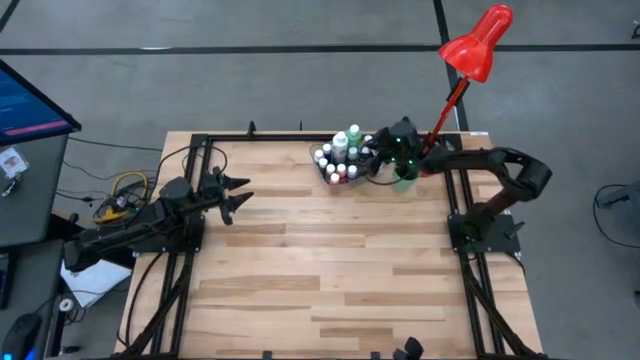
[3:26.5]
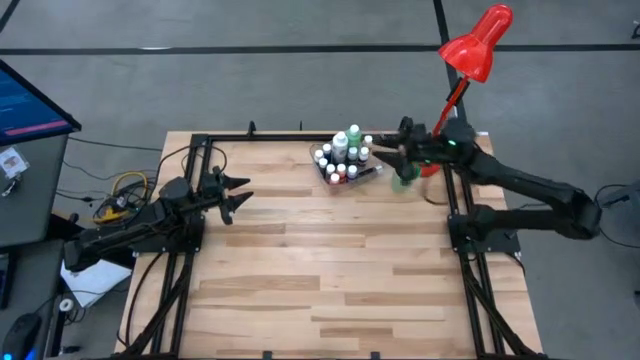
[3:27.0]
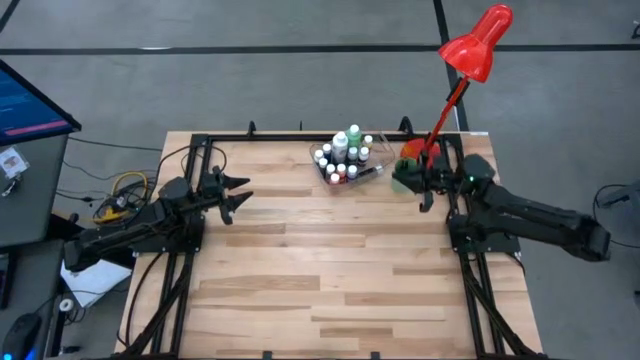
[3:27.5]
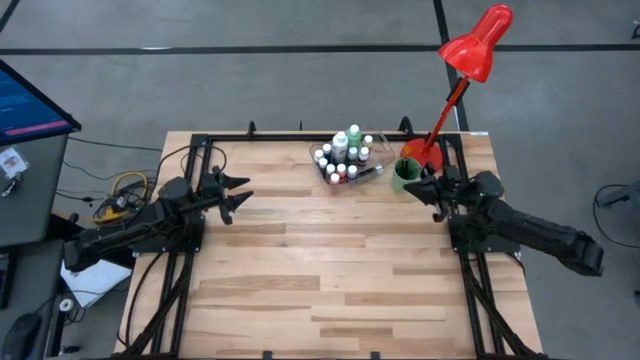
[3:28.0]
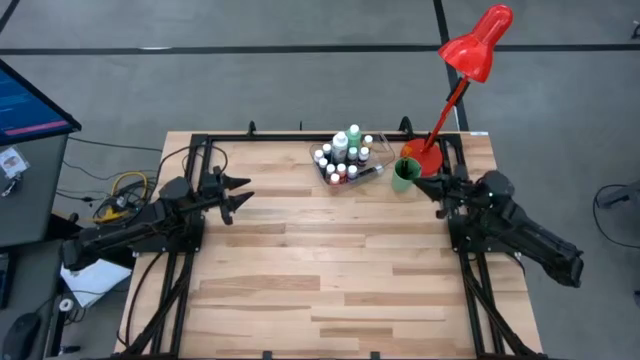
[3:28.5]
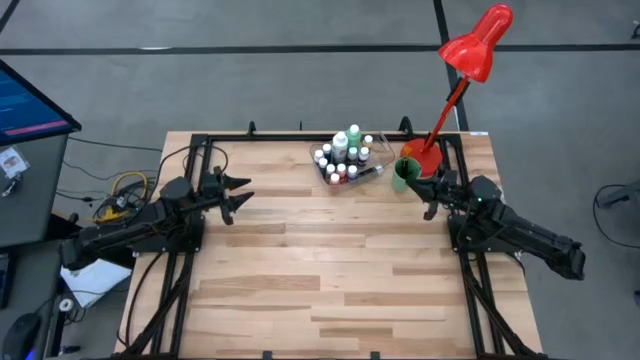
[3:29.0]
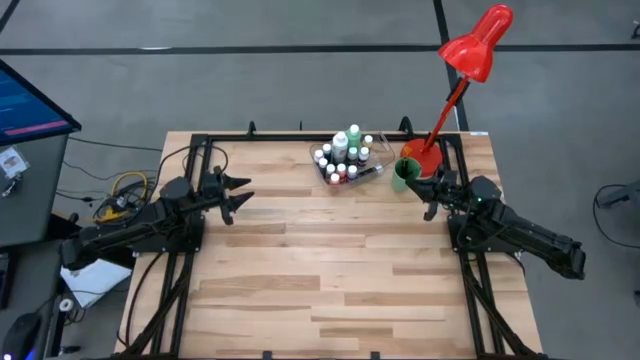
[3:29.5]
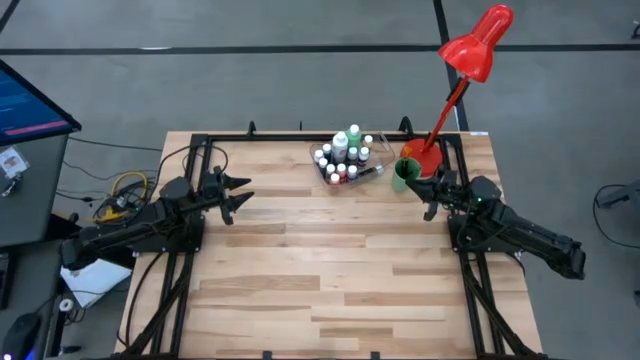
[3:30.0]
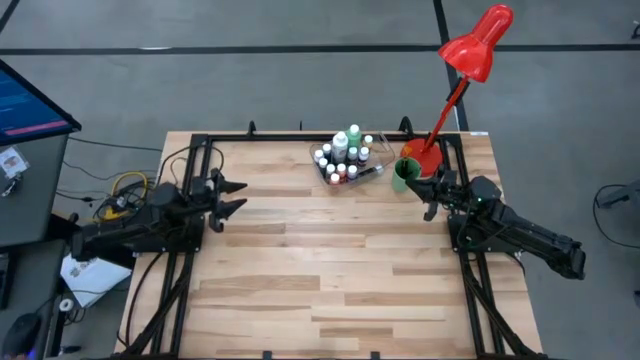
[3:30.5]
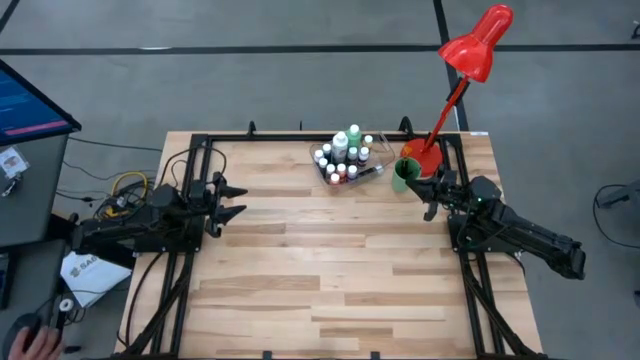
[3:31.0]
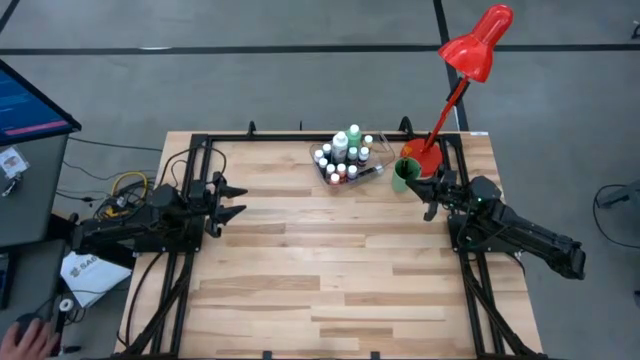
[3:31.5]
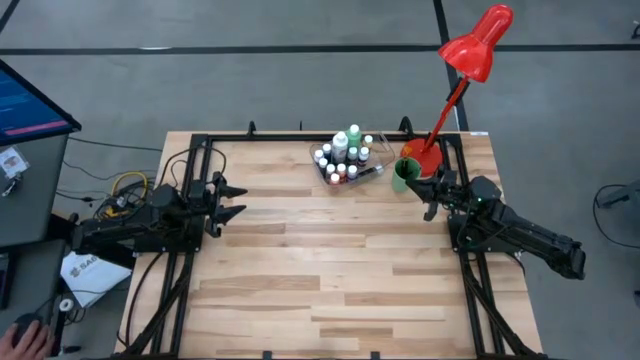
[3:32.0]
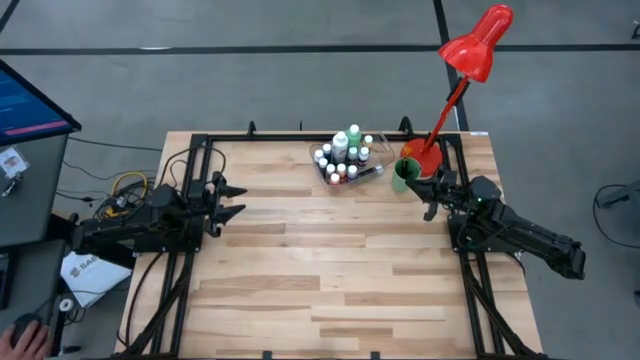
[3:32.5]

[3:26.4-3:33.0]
Task: Pick & Place Paint Supplies
Return to Home Position

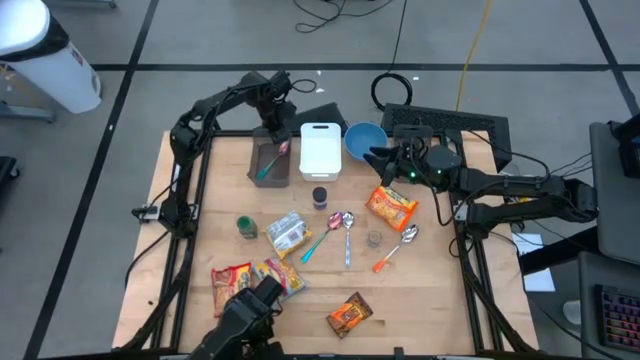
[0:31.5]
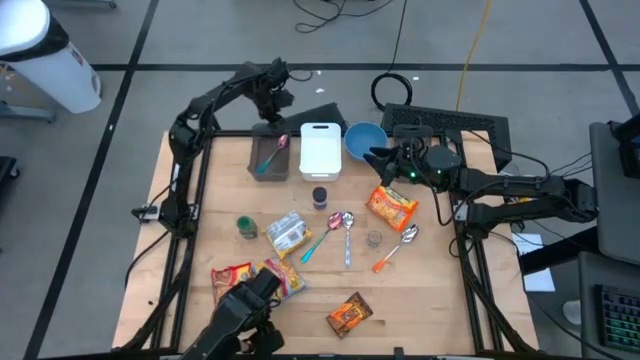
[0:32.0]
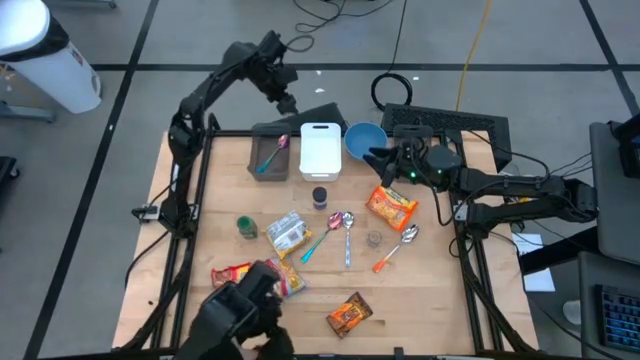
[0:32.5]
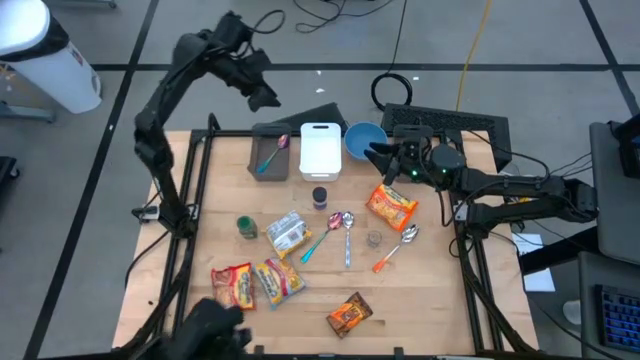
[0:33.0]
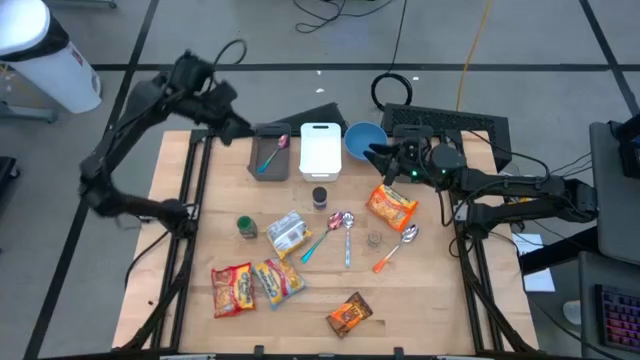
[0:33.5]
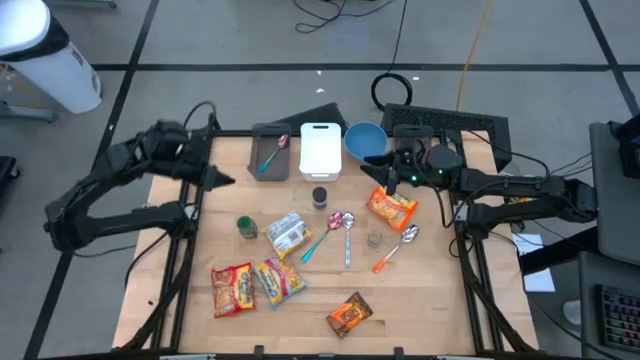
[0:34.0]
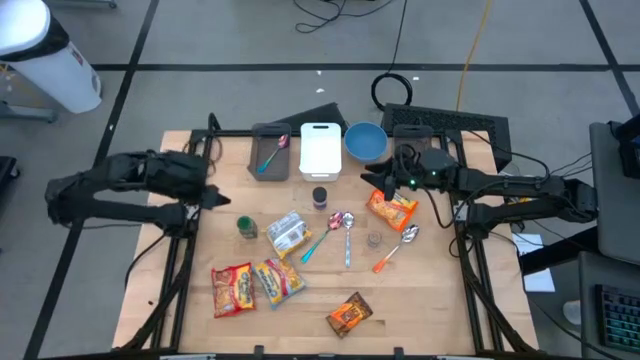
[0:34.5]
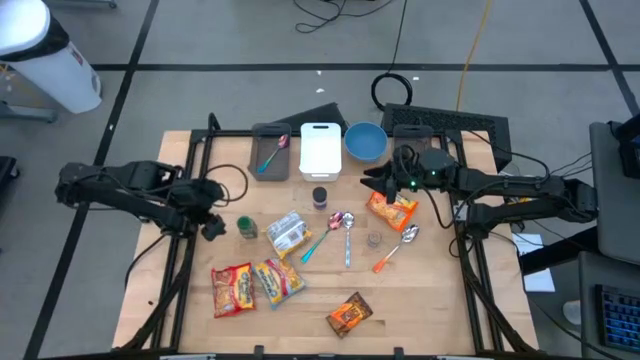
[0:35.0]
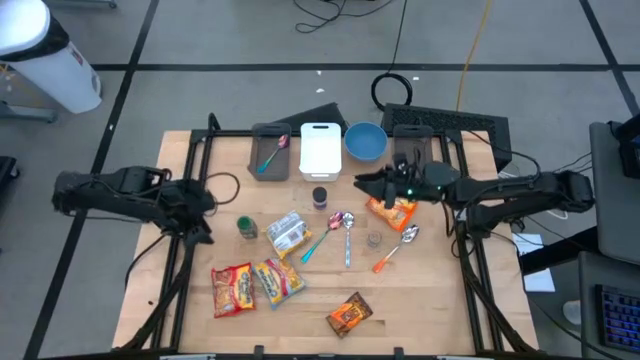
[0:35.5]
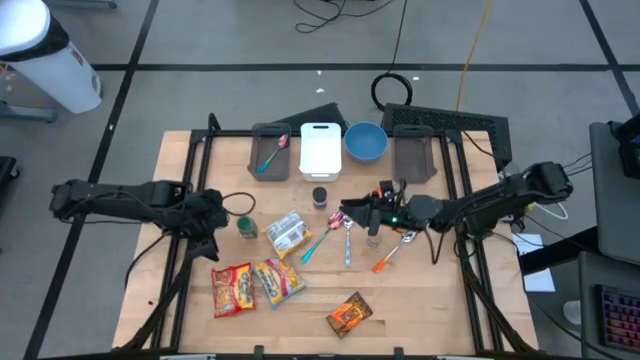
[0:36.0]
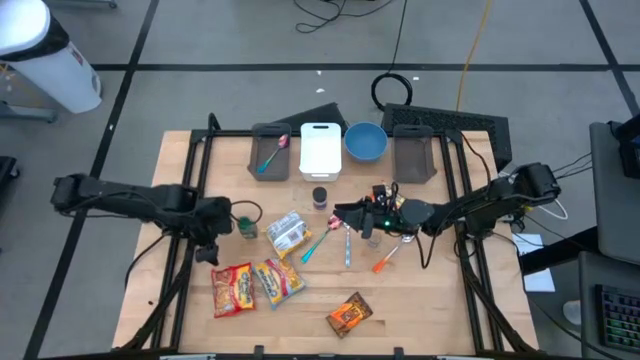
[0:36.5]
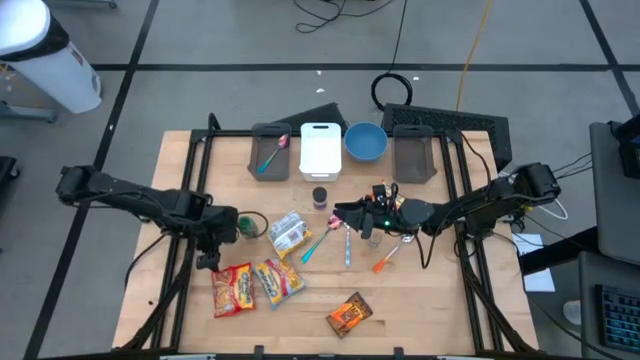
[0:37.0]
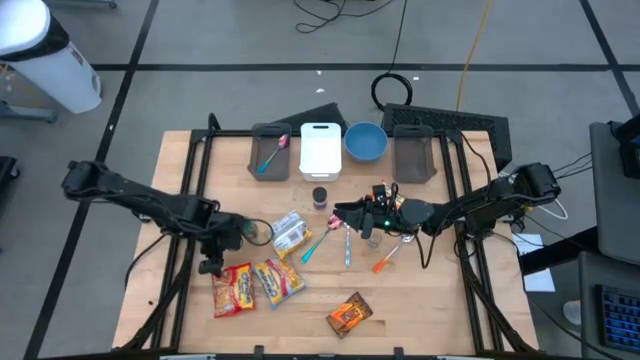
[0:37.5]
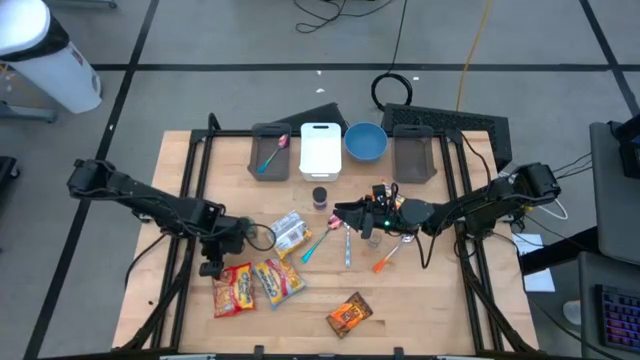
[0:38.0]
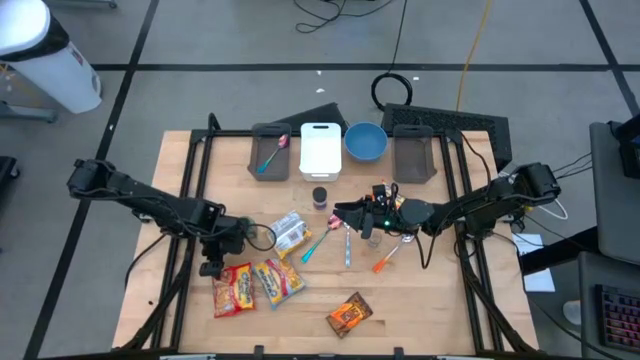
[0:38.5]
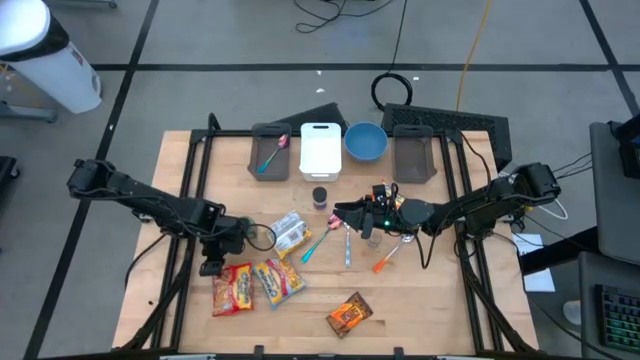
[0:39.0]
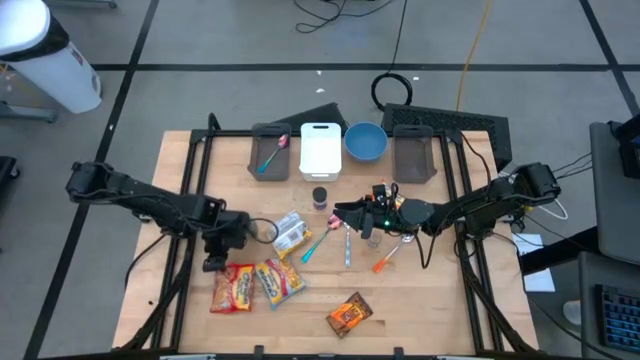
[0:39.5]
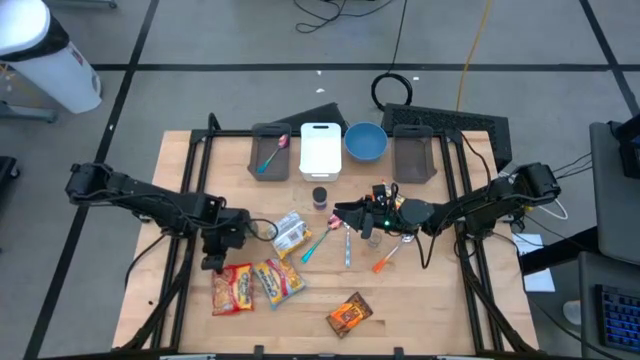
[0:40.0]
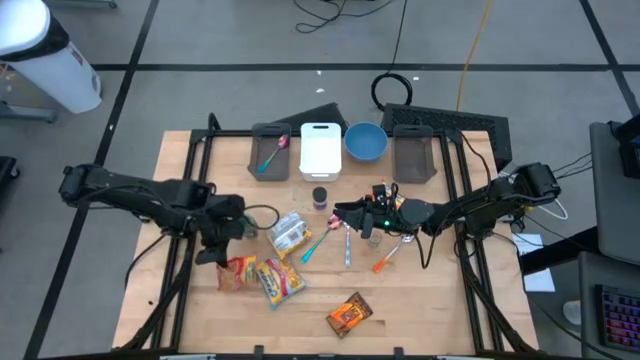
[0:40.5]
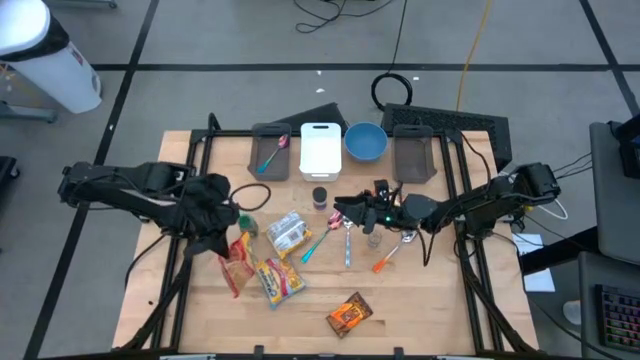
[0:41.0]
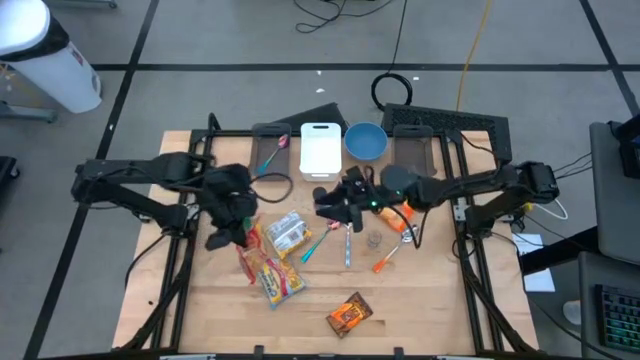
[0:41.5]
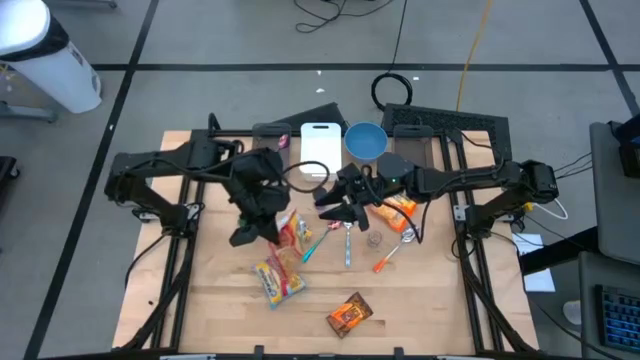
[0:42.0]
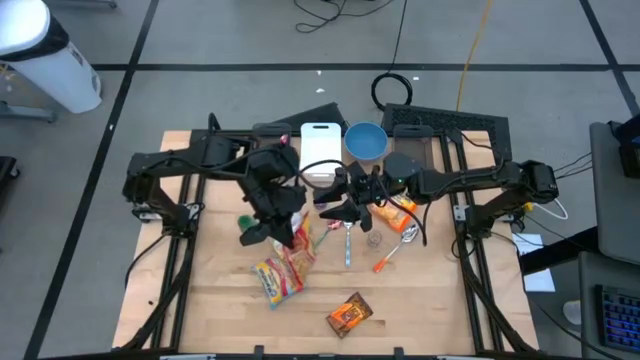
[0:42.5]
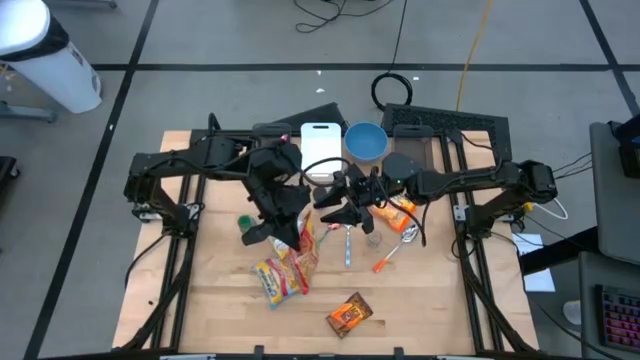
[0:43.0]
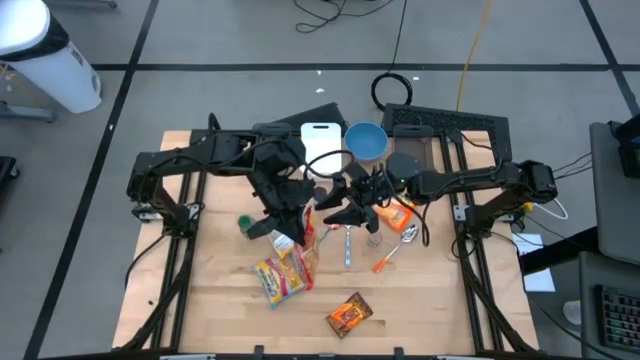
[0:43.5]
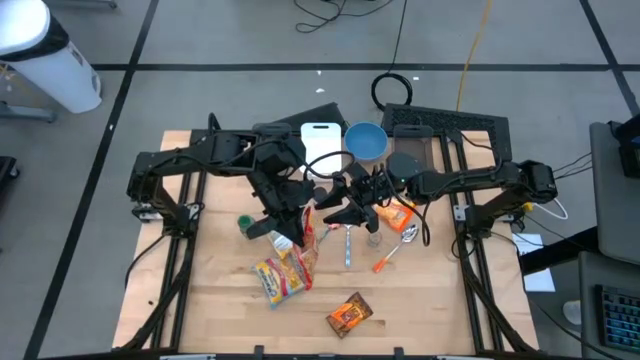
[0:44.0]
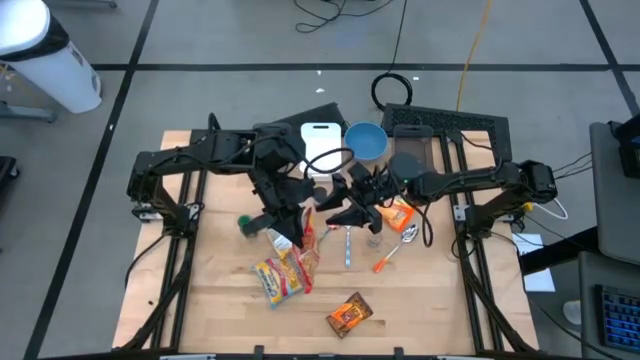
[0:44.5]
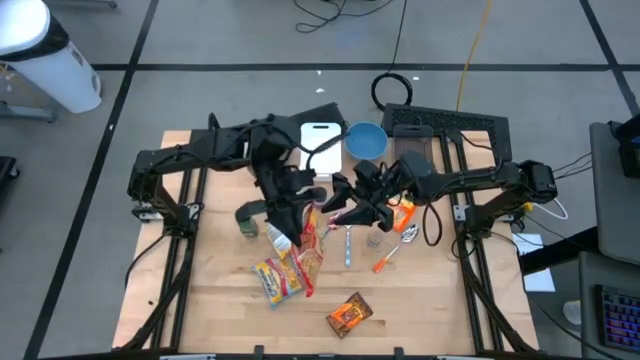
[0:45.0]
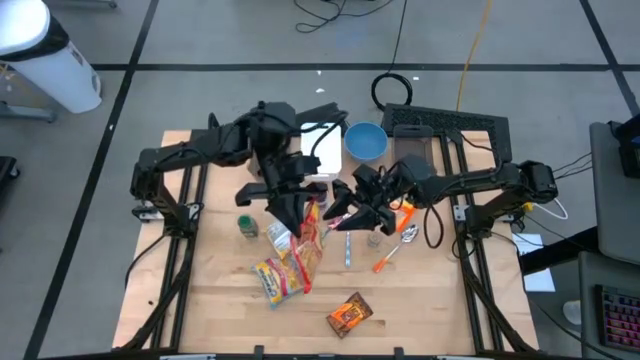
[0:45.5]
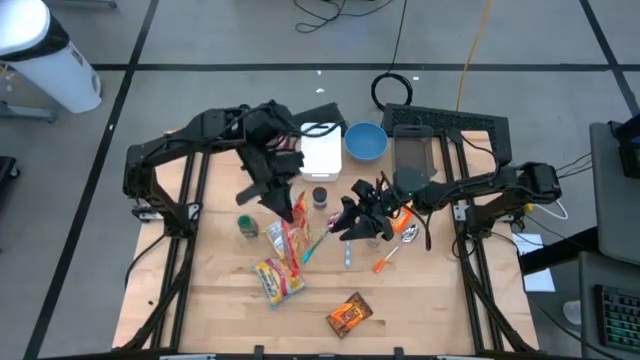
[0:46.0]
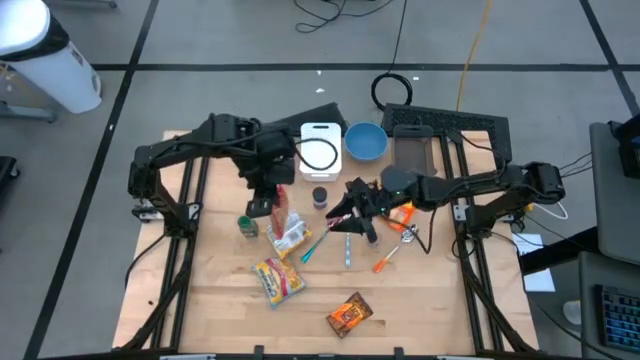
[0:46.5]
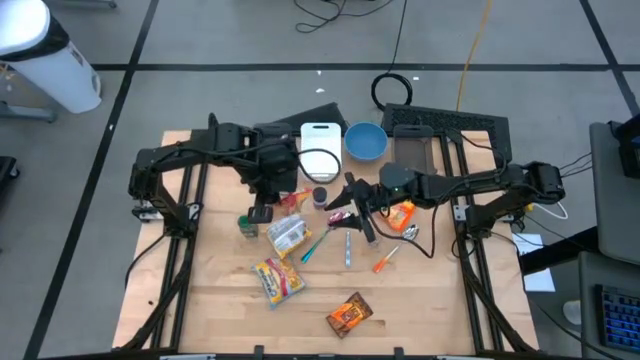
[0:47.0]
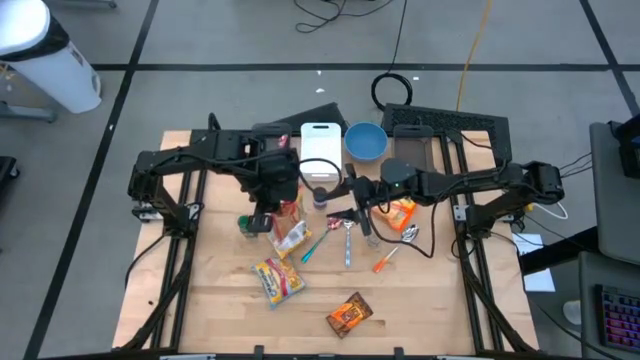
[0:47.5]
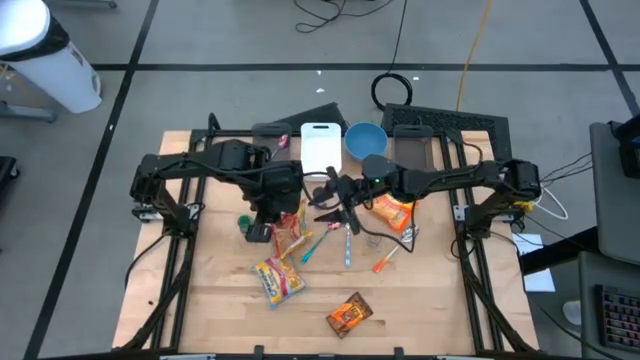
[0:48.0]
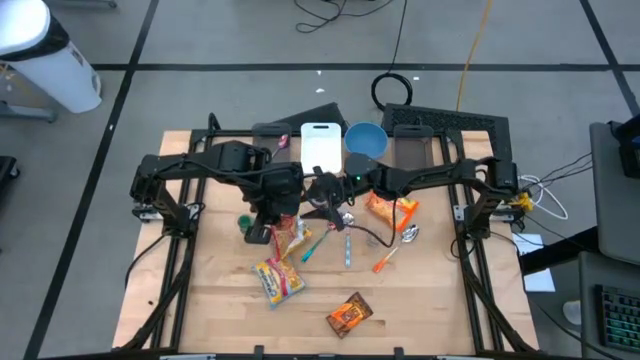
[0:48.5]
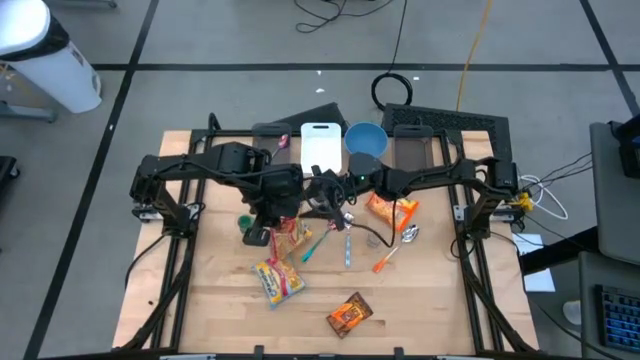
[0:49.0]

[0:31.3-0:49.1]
Task: Pick & Place Food Item
Put the red noodle pack into the right black bin
